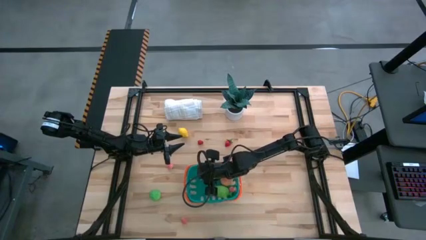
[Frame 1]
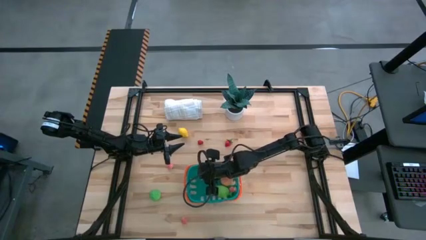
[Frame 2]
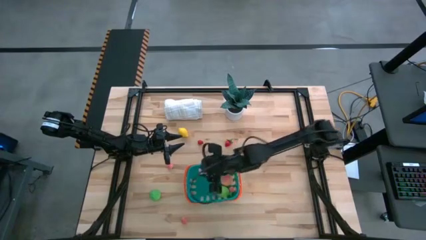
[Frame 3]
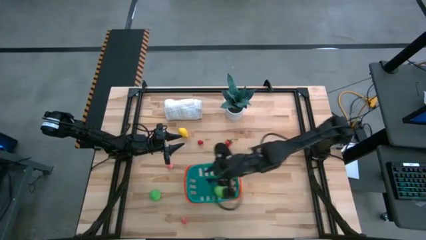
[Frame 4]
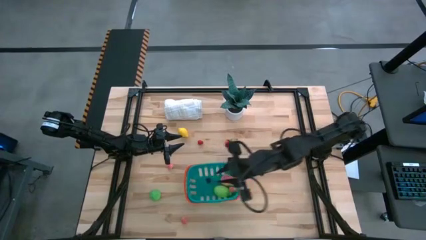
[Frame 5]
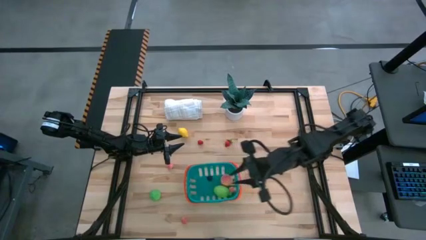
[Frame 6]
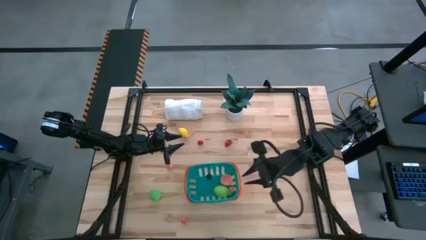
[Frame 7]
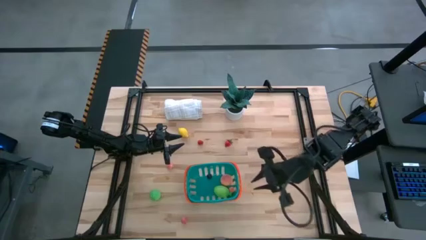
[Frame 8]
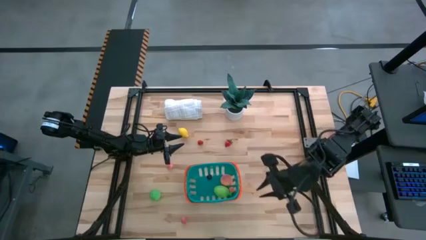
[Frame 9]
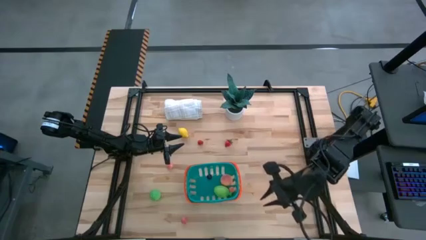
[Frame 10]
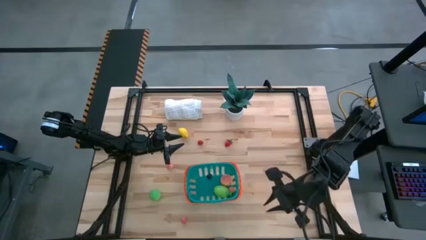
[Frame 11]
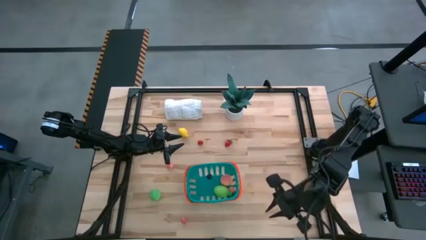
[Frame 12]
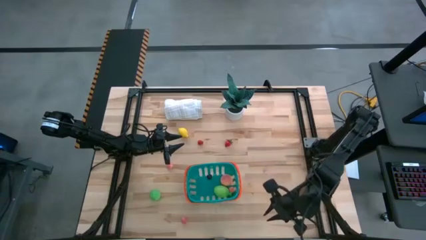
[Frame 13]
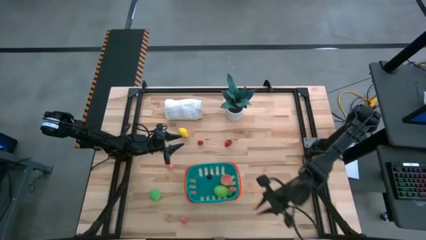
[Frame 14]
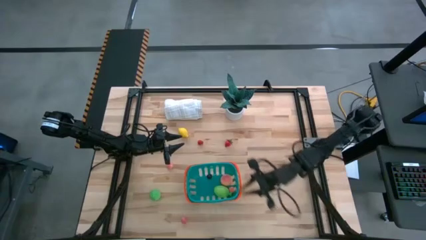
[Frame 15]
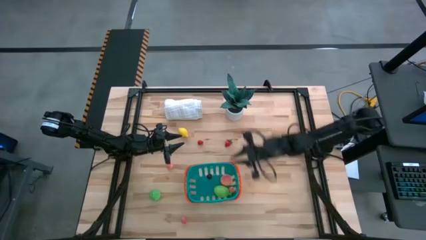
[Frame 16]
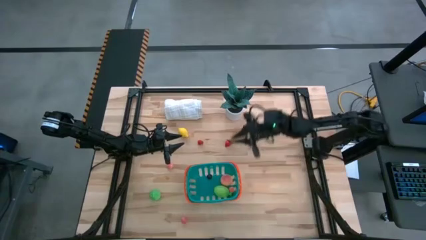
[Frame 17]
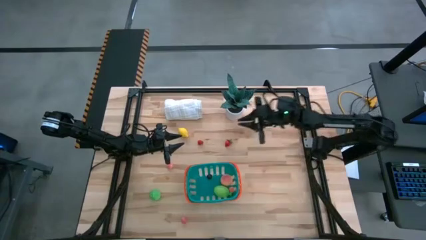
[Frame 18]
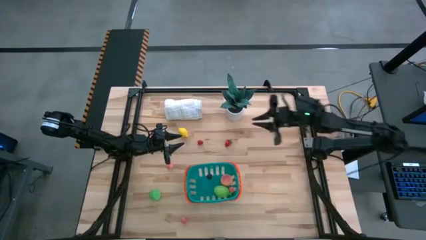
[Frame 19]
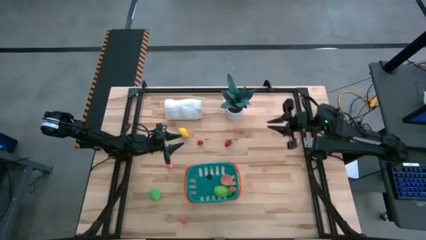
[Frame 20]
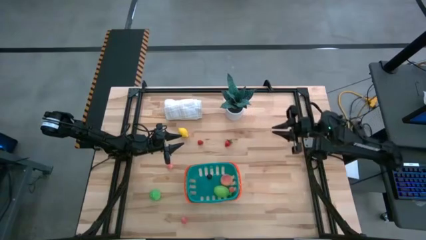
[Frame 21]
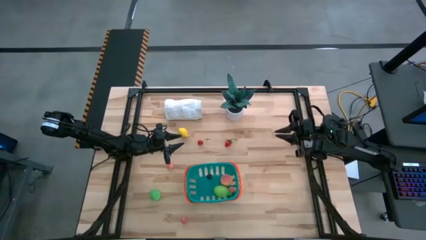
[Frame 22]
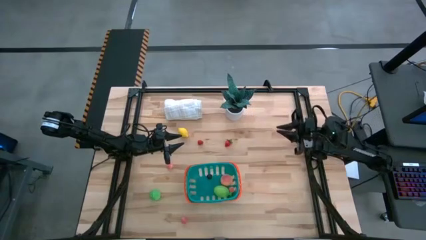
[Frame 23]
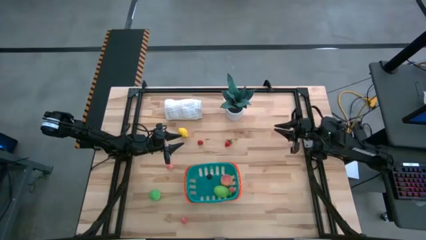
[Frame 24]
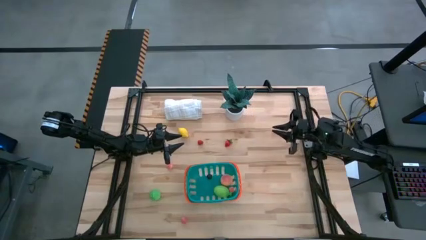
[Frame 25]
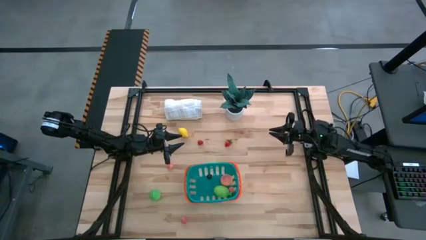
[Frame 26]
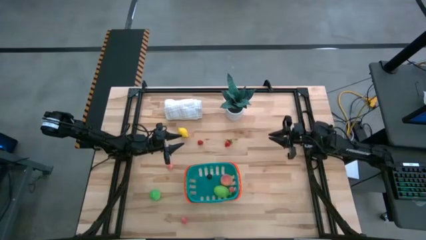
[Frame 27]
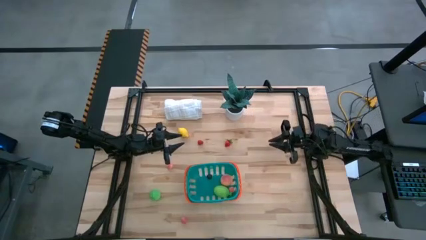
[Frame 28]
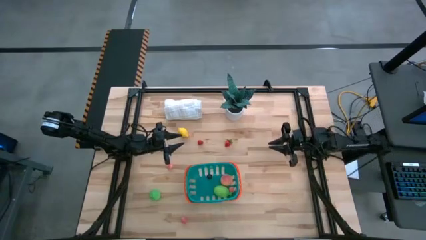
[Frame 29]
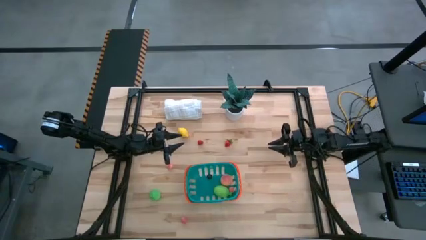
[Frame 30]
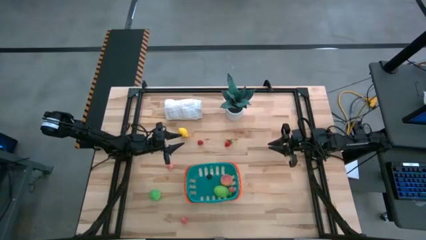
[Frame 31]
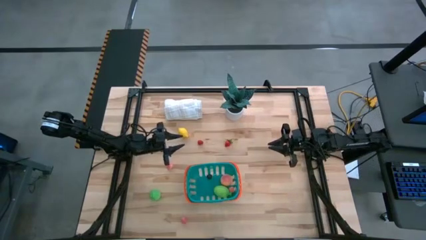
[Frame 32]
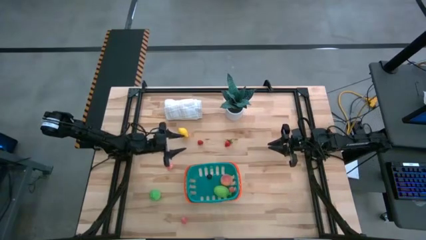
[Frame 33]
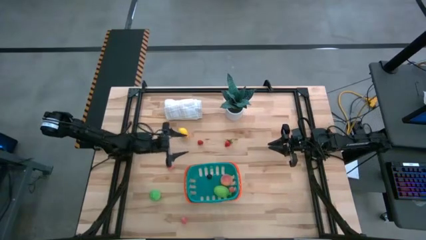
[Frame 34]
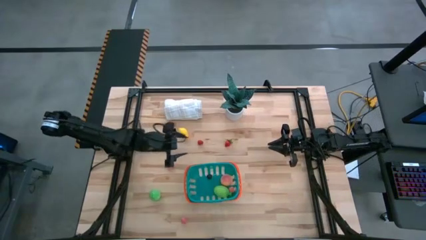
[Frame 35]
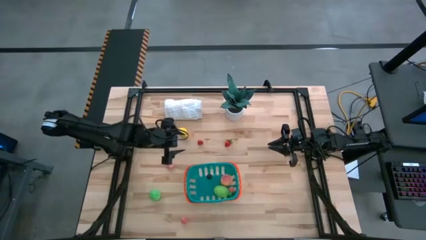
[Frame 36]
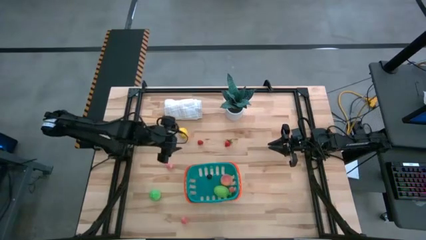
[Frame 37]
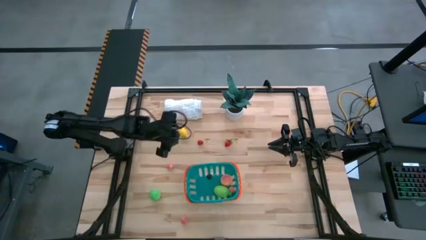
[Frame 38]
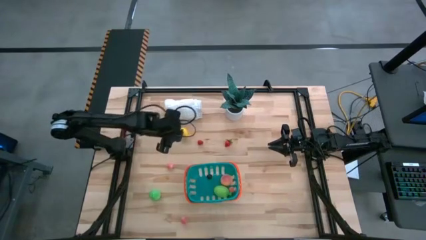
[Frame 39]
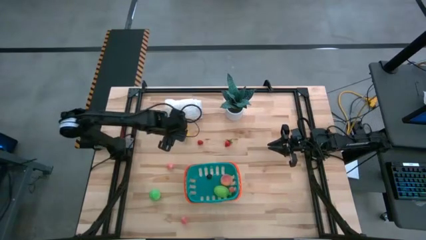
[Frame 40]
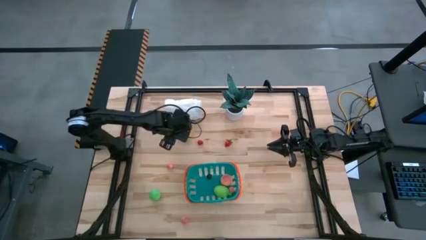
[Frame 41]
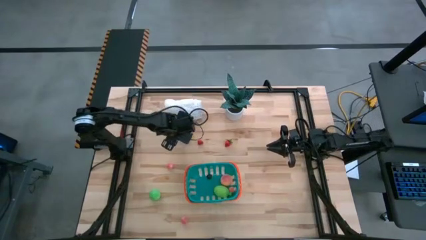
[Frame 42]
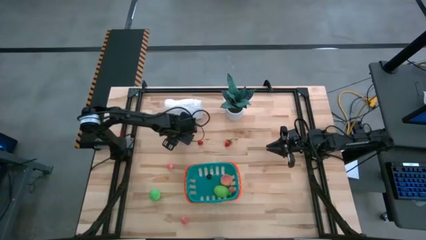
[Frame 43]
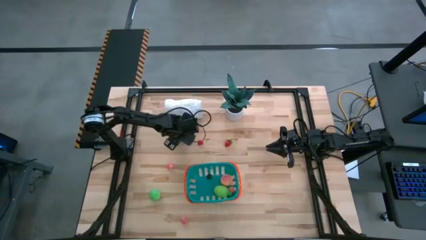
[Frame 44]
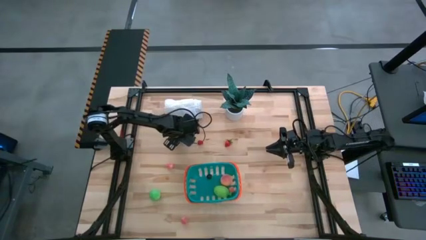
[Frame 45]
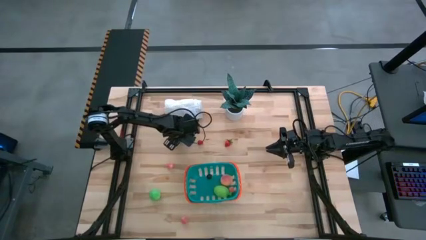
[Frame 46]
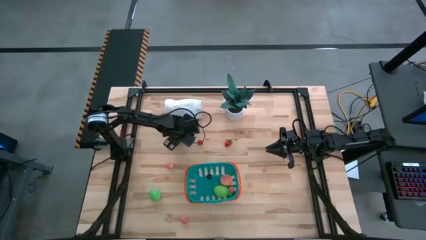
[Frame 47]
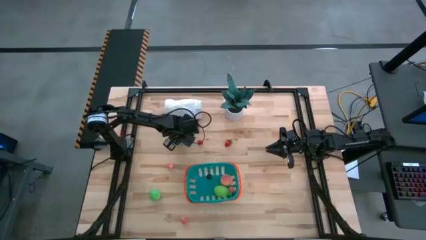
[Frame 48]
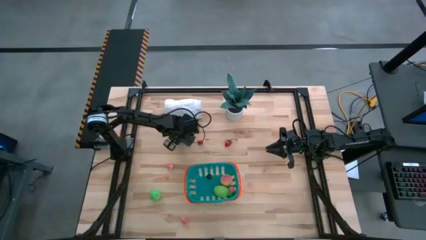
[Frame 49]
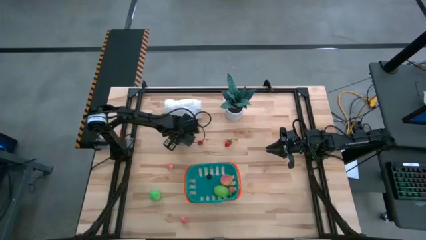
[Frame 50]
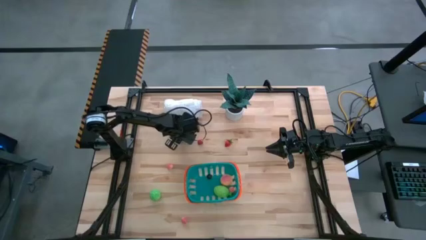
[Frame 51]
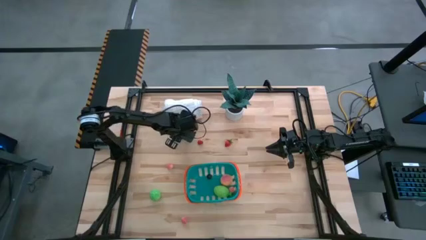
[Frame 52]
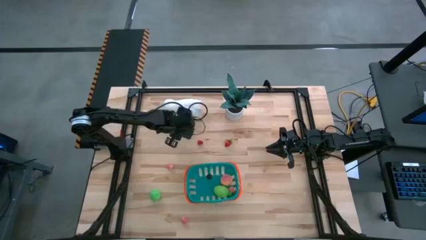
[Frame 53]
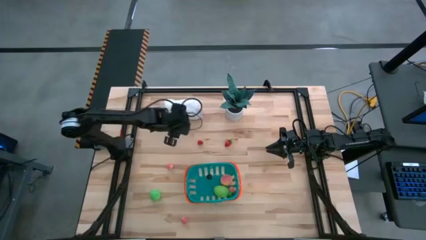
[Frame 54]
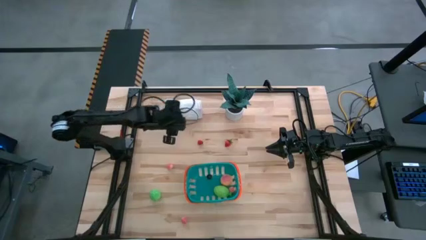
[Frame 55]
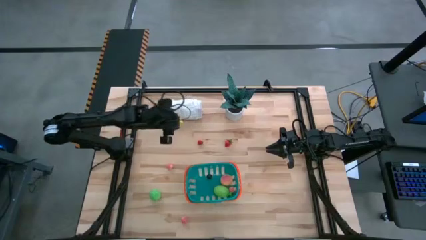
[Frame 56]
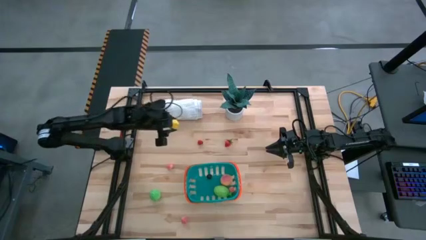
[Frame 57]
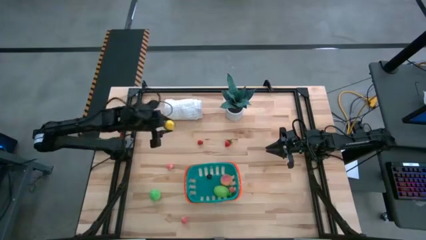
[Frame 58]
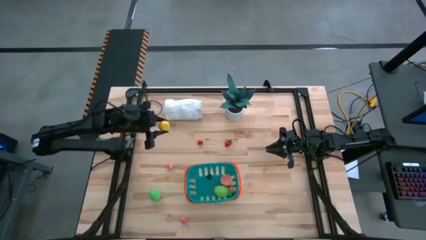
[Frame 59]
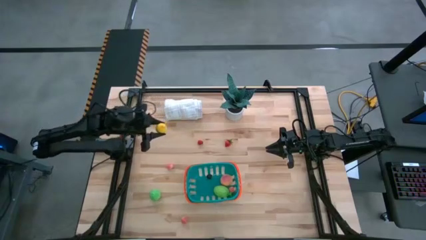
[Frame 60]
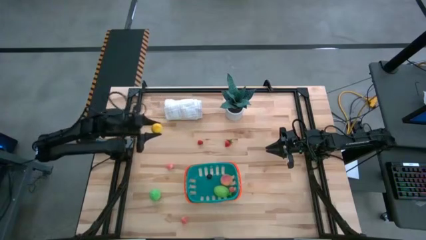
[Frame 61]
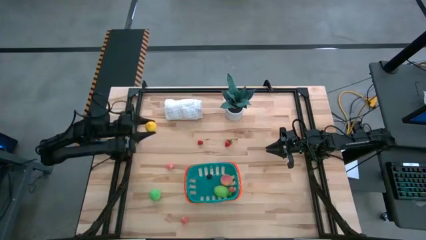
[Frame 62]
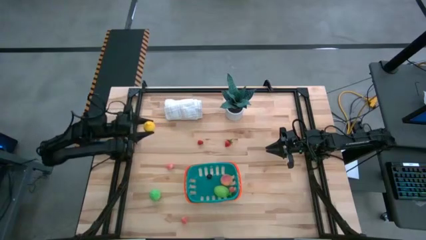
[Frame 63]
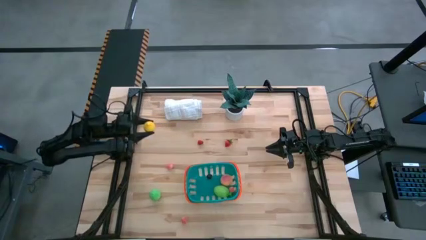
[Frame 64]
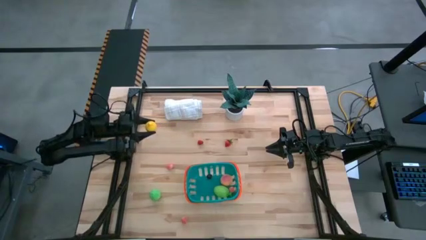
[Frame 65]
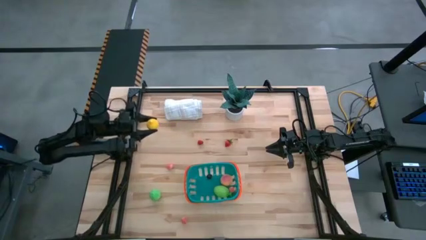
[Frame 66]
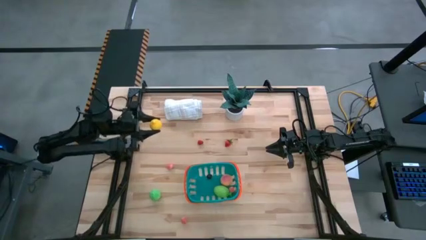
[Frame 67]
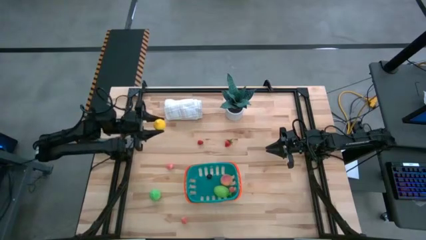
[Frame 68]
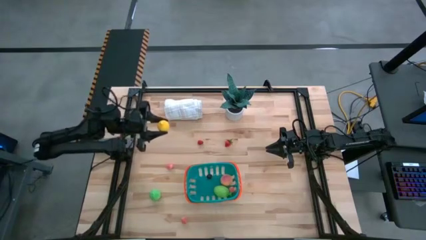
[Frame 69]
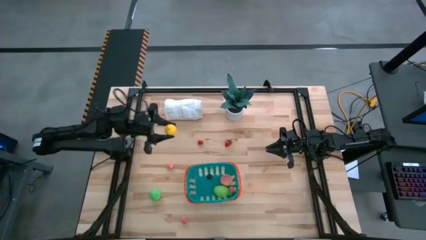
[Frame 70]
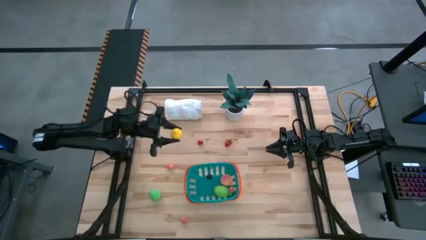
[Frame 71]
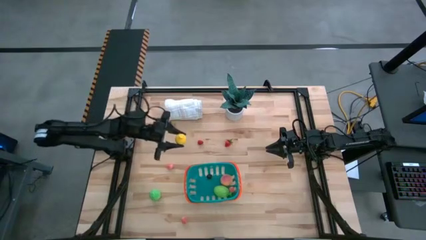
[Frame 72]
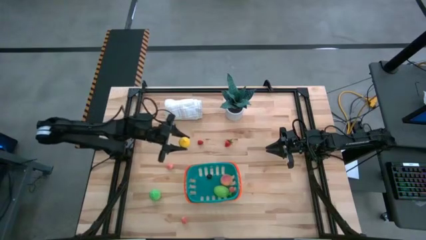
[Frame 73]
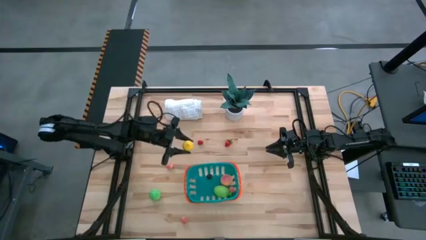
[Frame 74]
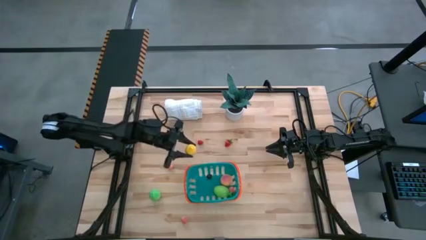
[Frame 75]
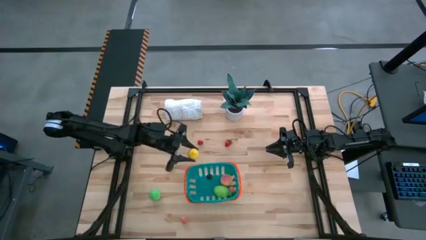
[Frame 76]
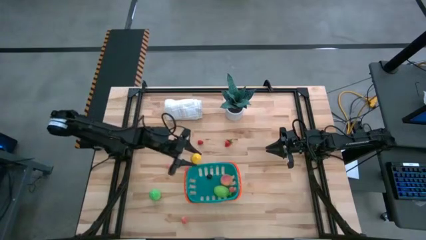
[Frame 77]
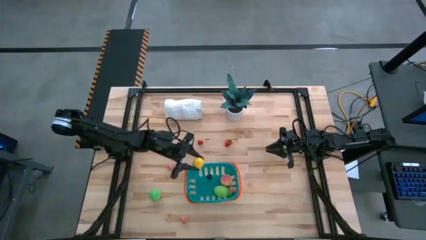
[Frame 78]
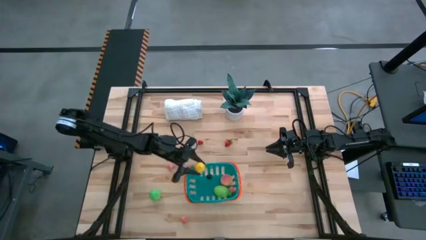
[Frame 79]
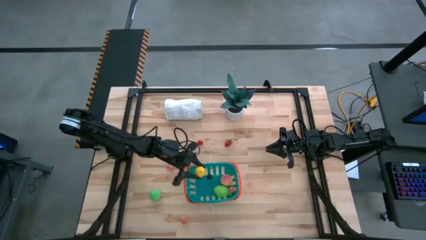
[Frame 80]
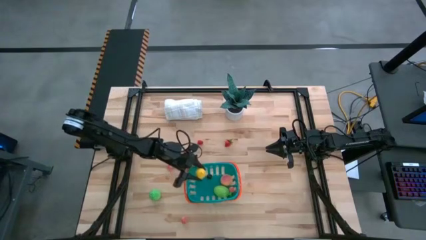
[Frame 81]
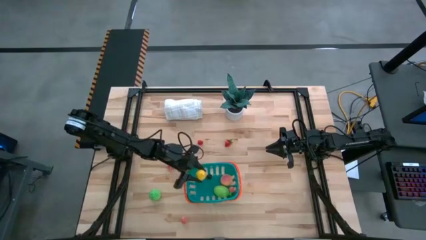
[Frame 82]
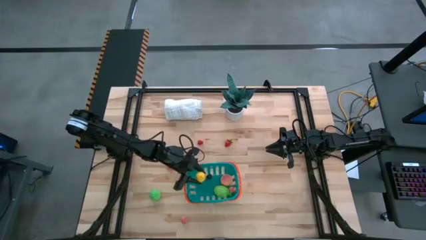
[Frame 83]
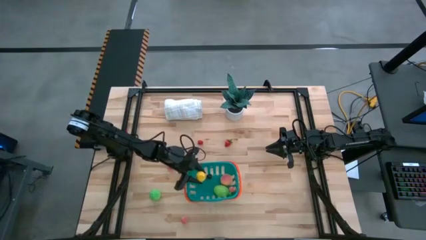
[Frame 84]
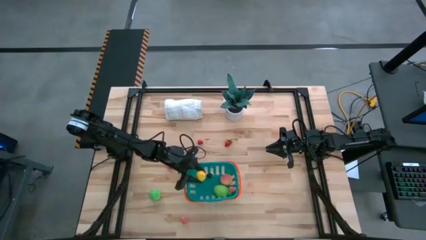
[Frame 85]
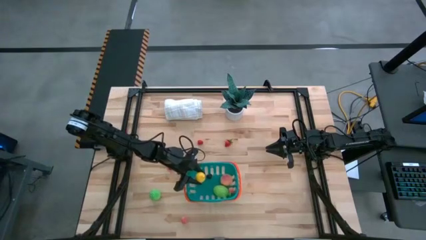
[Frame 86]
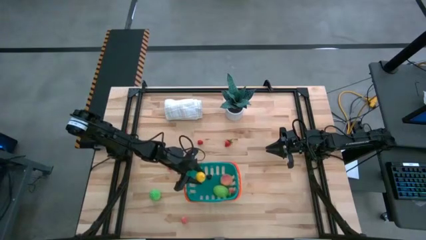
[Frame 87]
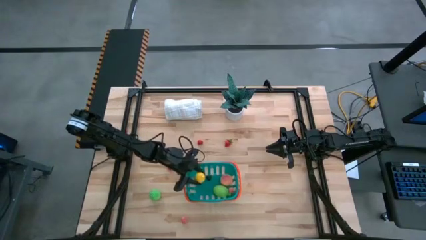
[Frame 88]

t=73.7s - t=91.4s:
Task: Pick and placing Produce into tupperware
Put the yellow lemon into the blue basket
